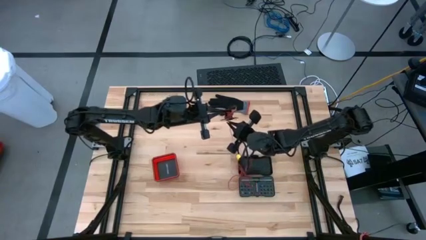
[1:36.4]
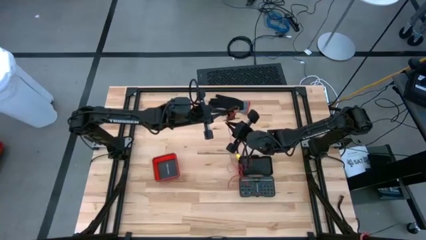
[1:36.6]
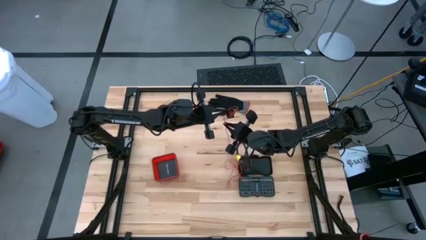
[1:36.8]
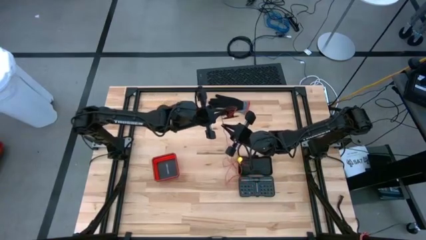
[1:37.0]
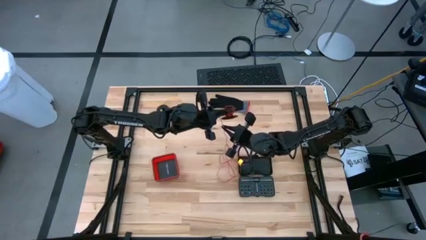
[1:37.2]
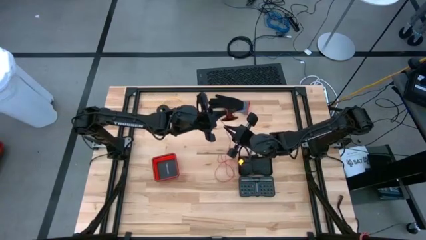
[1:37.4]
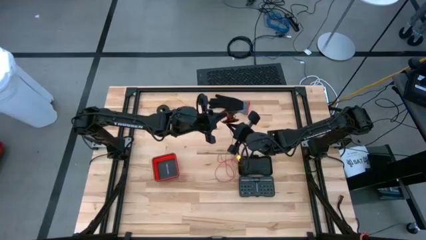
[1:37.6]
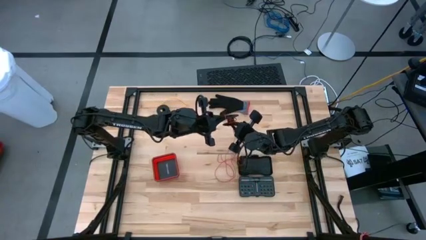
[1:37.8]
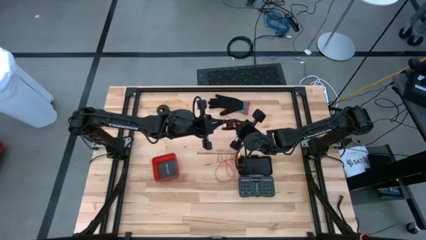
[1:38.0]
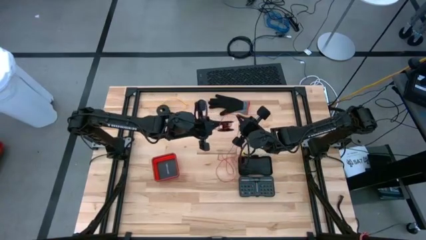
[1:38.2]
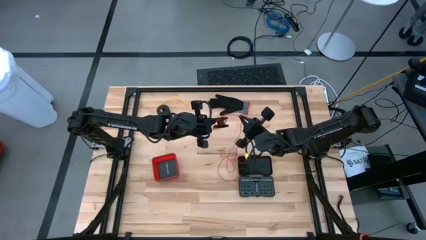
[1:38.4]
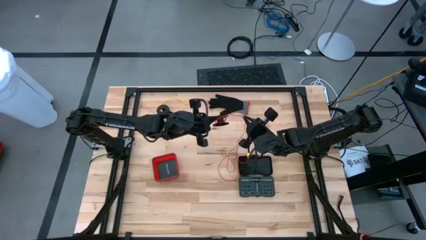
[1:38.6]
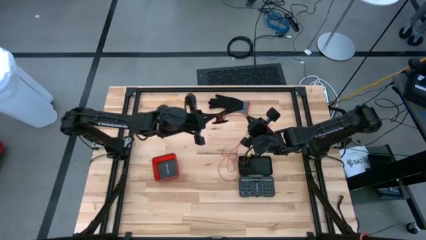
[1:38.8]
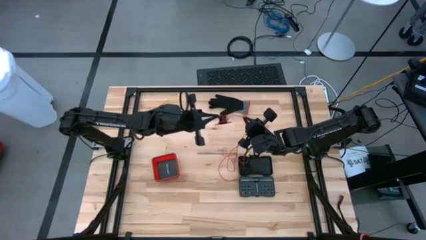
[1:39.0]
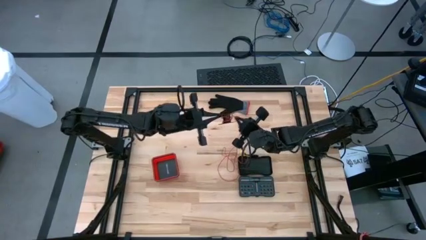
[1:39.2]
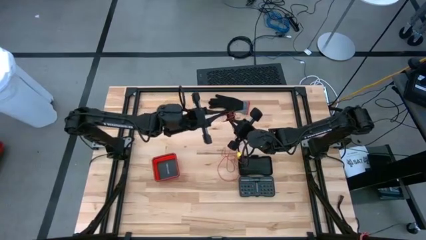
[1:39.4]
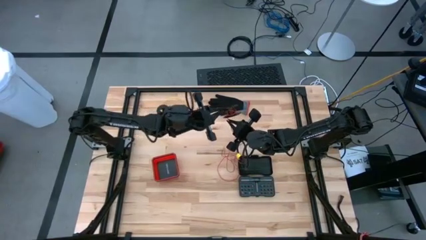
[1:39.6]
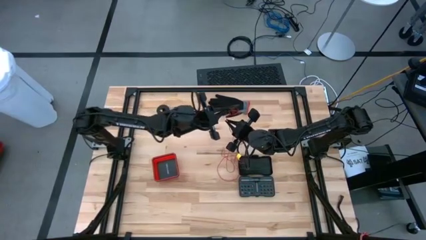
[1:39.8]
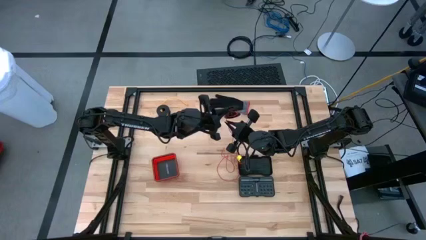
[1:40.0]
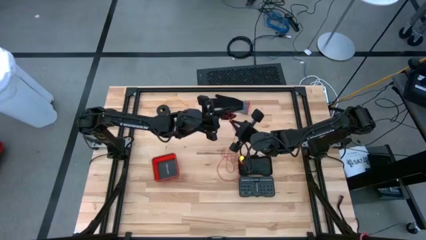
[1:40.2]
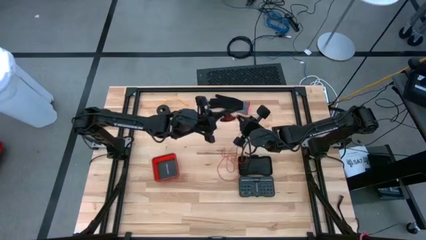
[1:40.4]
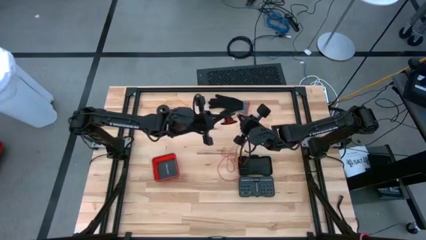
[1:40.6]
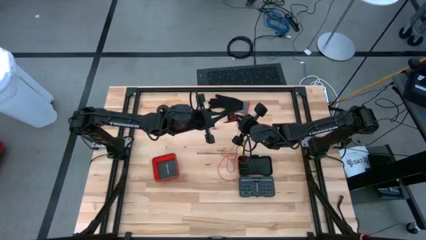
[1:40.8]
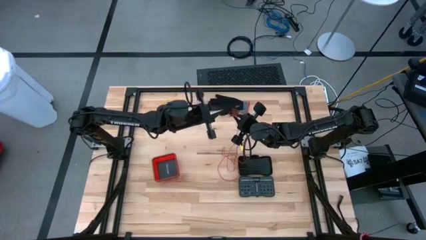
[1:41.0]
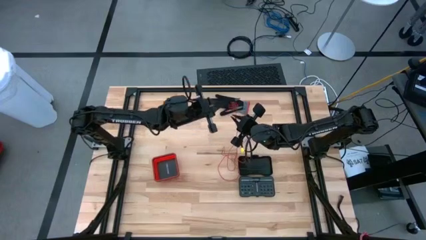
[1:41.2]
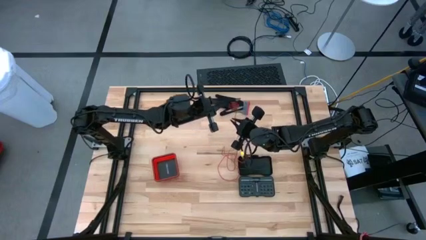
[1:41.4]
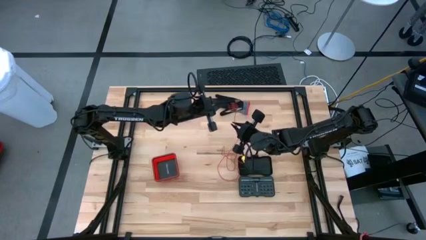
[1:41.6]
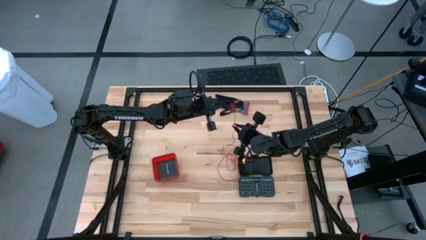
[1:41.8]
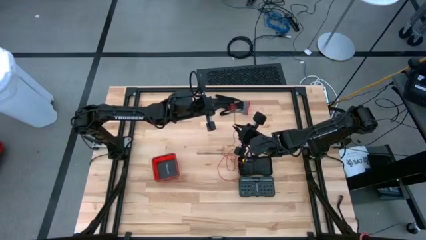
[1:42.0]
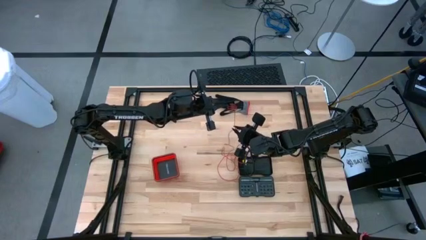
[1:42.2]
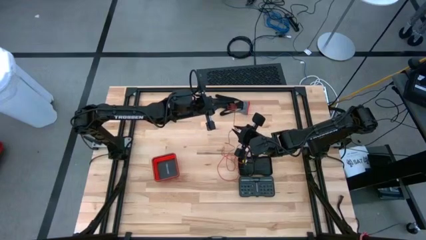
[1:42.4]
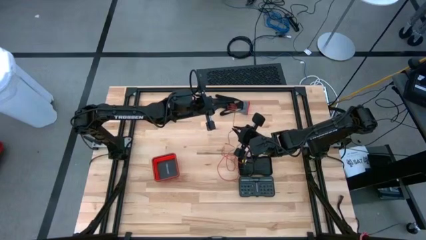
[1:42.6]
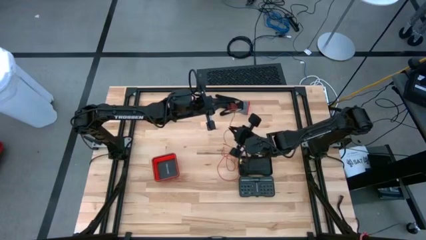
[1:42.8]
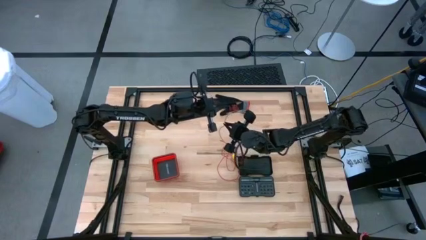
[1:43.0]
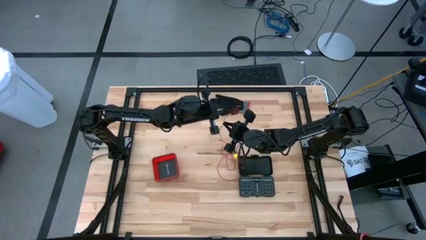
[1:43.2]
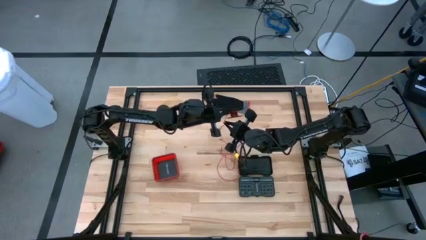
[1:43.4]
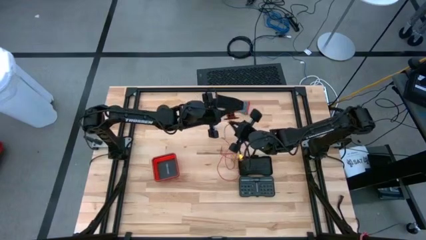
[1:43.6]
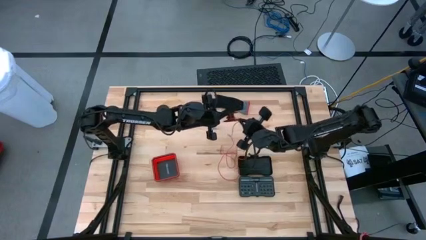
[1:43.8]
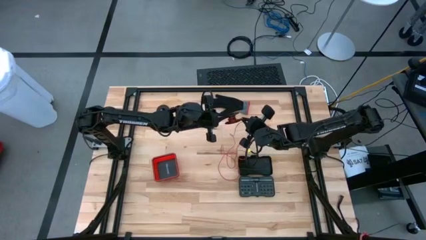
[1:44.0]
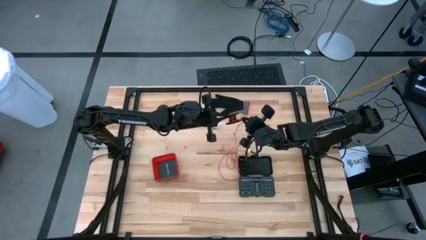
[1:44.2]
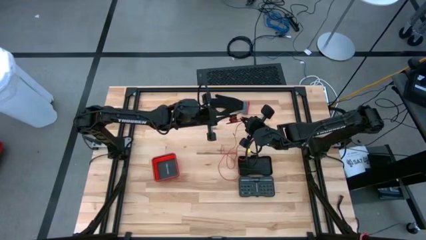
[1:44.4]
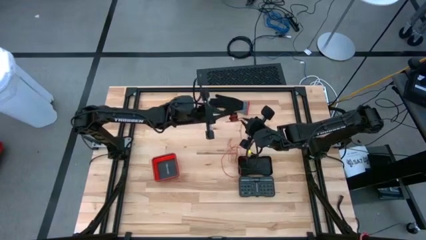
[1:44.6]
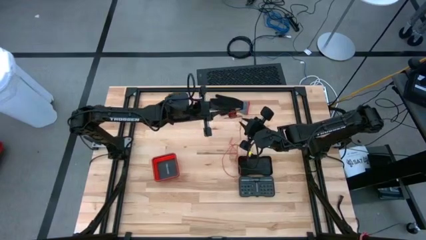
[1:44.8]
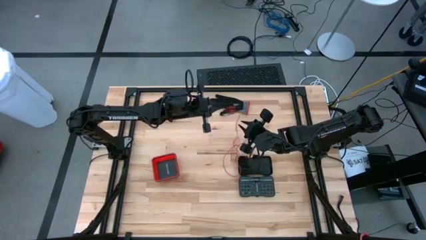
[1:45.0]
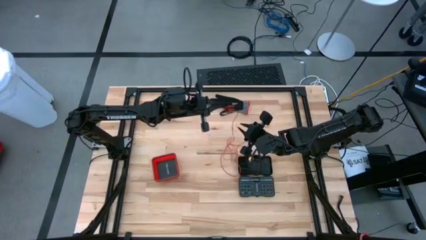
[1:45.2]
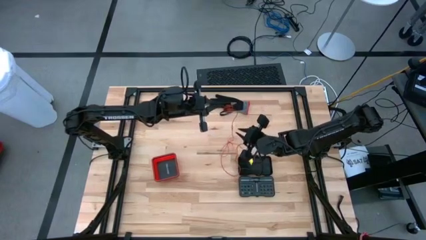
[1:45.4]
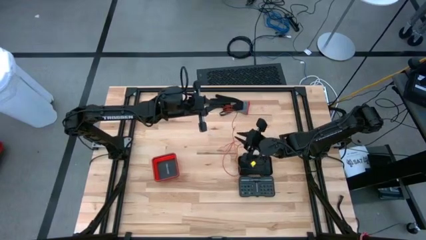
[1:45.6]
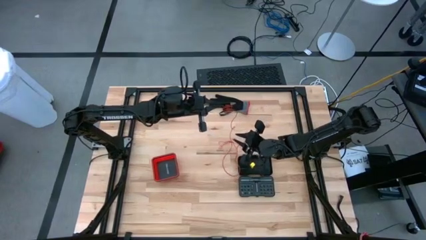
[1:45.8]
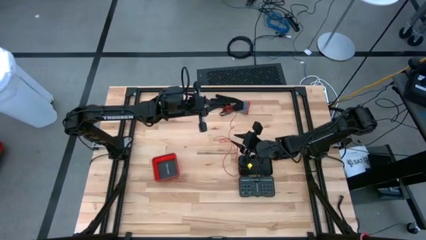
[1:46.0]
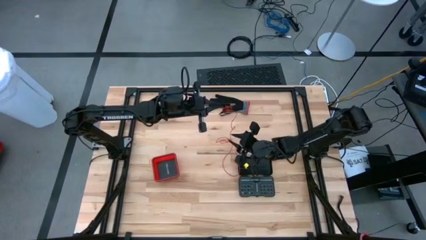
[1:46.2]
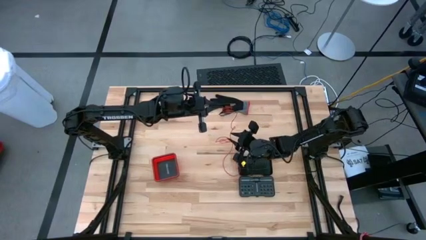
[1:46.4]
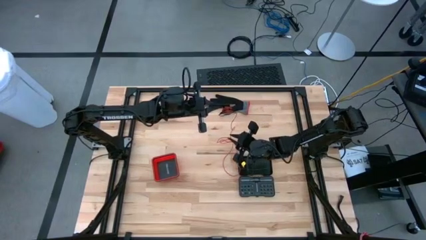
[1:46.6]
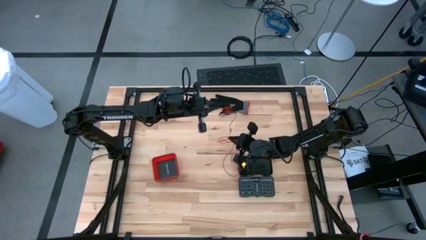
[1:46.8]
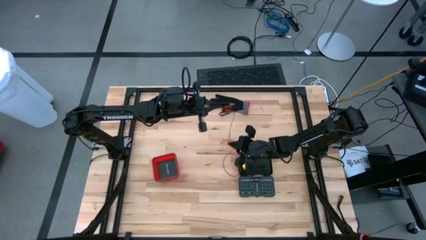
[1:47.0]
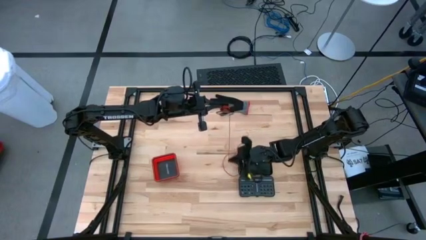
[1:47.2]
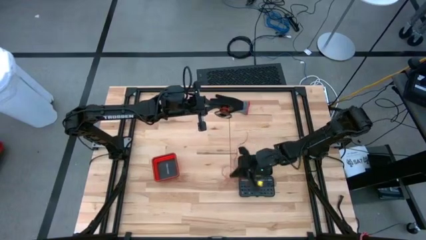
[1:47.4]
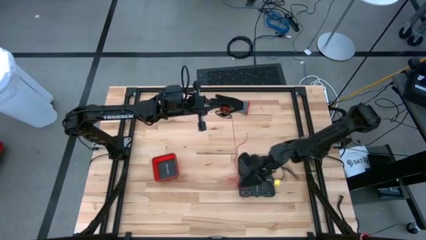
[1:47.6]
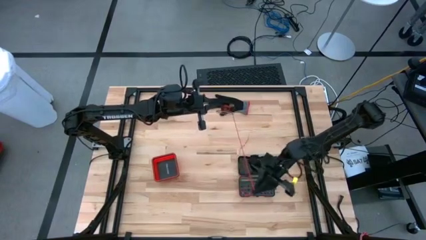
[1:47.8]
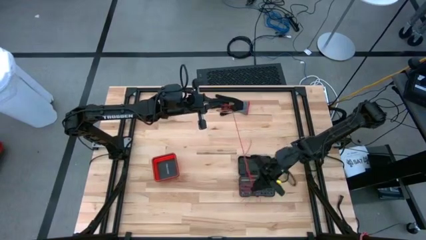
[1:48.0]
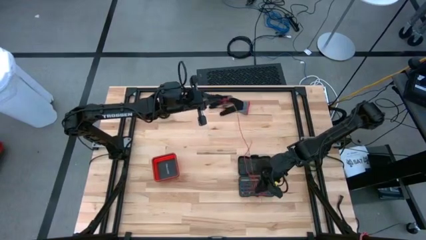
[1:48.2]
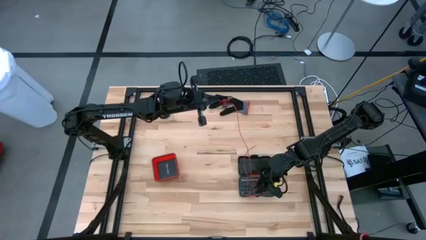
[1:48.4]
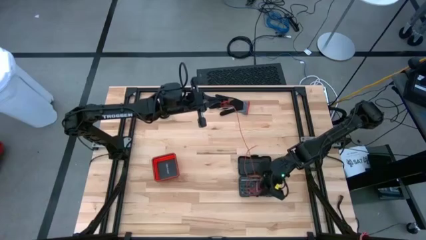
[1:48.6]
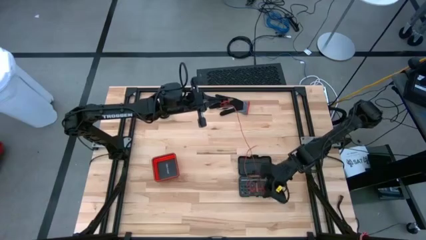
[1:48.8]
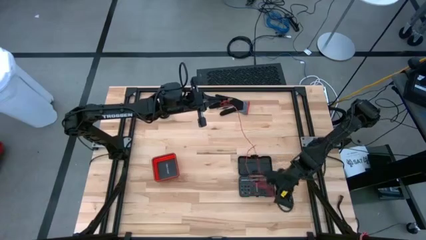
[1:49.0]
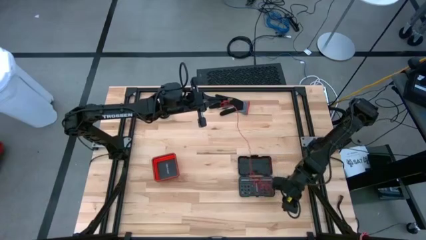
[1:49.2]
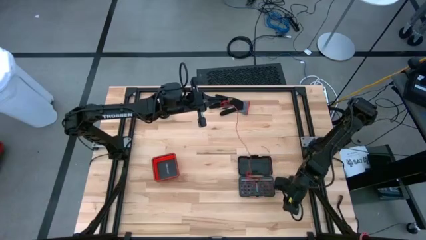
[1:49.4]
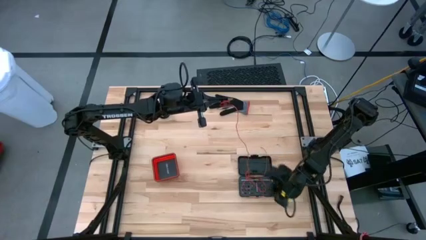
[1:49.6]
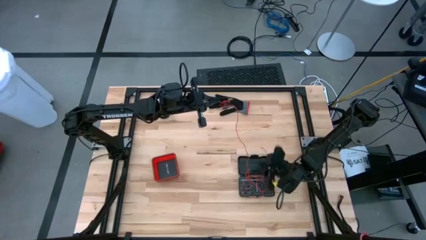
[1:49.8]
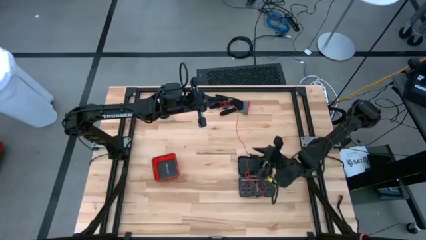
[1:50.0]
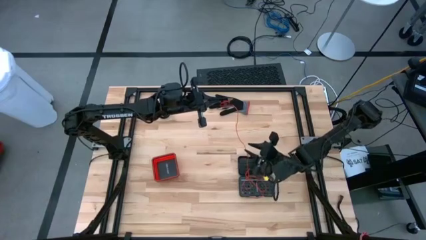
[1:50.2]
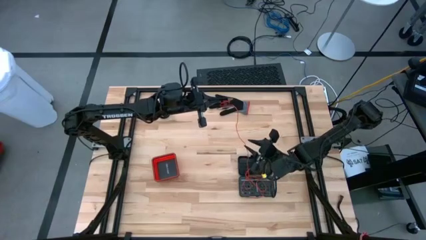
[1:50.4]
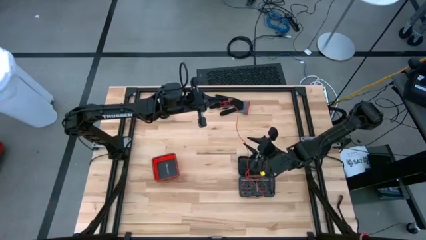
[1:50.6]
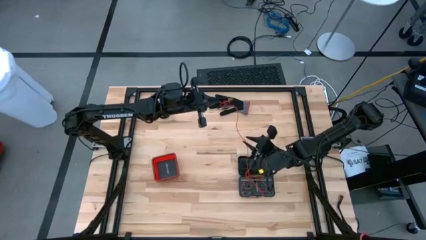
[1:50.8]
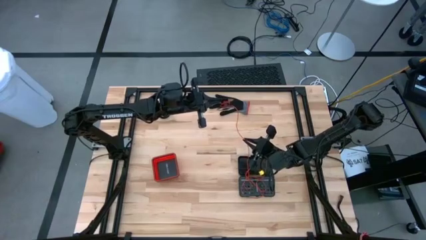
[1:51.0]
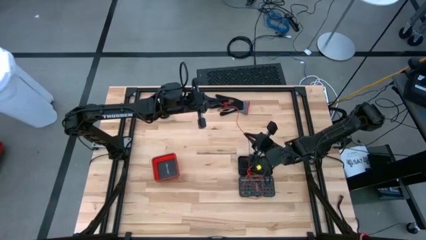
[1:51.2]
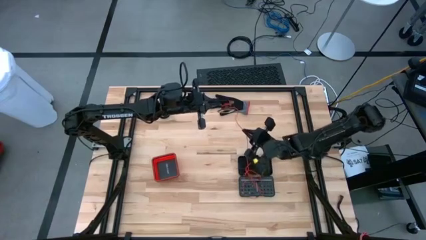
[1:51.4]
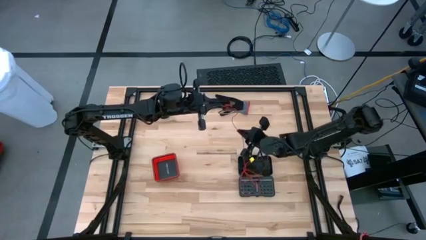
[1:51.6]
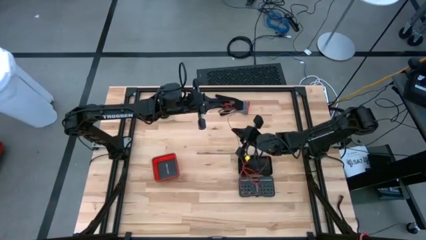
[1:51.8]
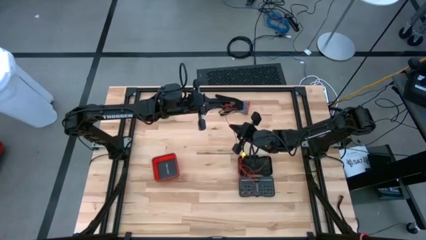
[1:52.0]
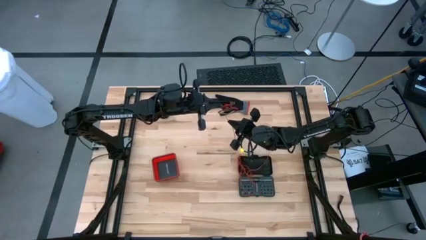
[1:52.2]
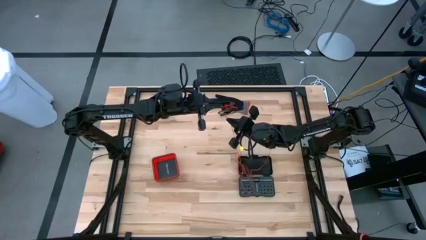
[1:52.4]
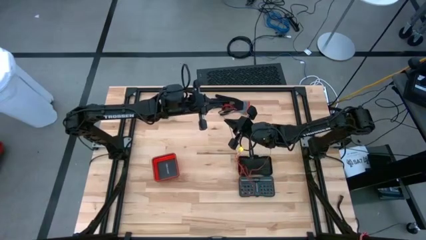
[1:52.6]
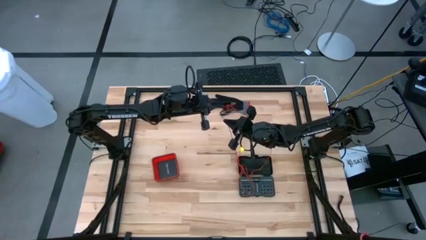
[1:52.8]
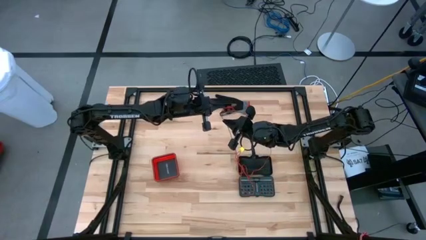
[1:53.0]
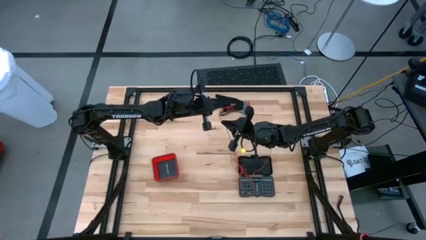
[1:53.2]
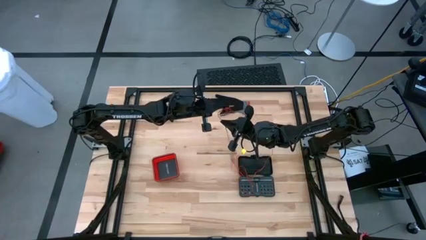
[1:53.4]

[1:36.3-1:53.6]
Task: Coil cords
Coil the red wire onto the spool
